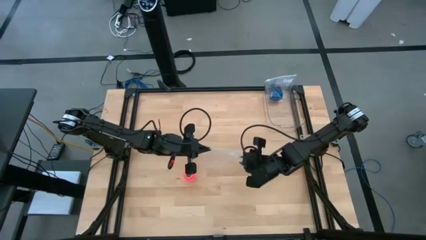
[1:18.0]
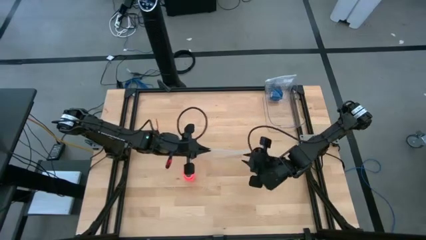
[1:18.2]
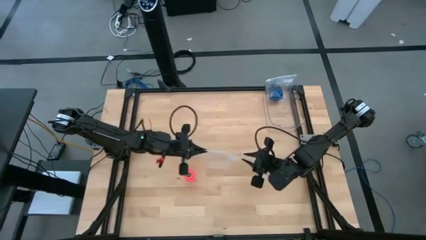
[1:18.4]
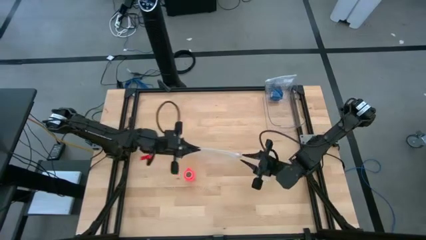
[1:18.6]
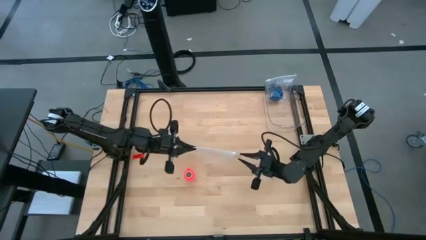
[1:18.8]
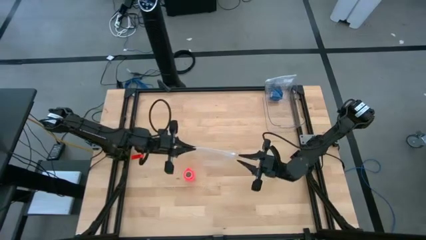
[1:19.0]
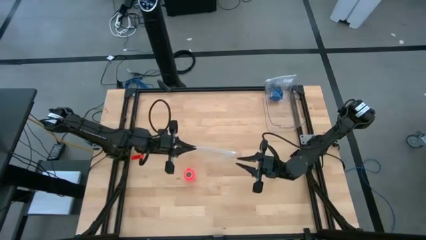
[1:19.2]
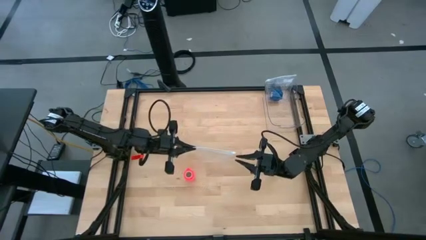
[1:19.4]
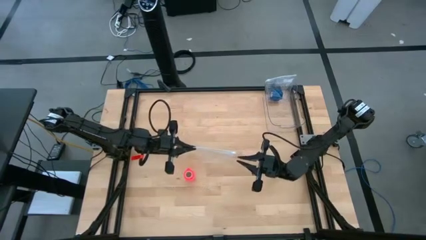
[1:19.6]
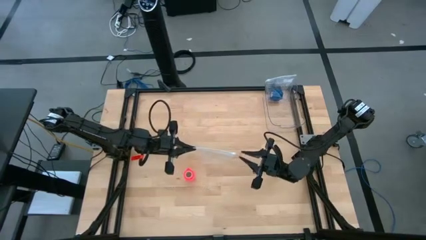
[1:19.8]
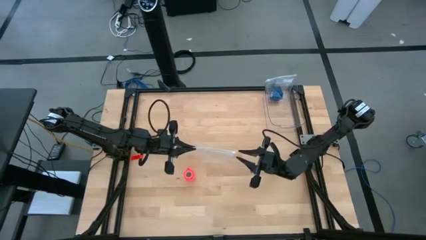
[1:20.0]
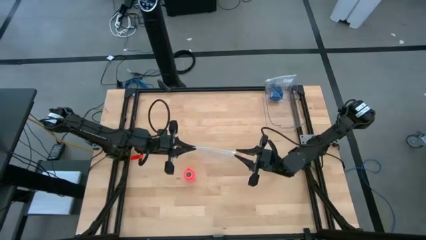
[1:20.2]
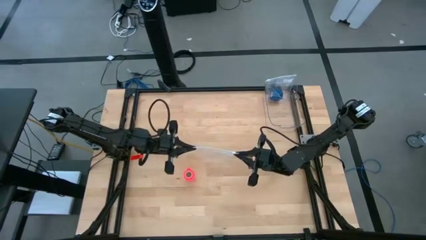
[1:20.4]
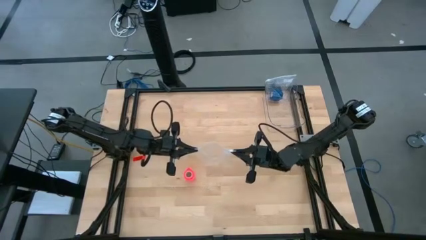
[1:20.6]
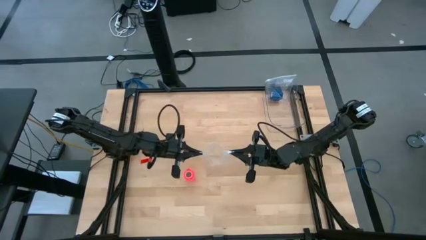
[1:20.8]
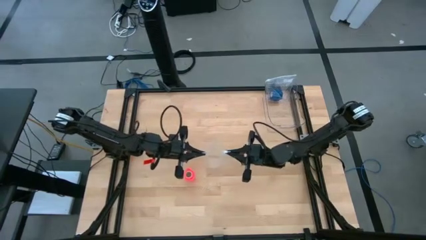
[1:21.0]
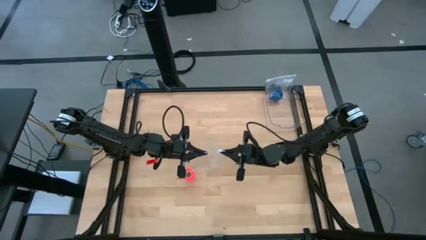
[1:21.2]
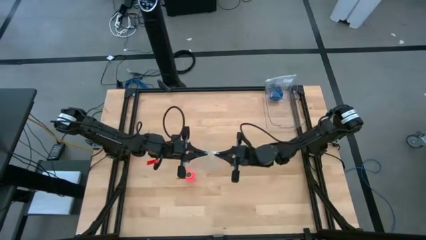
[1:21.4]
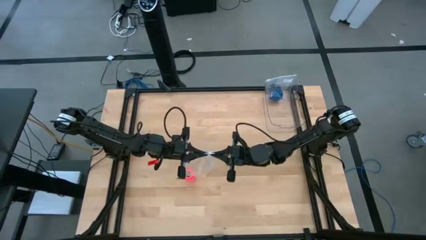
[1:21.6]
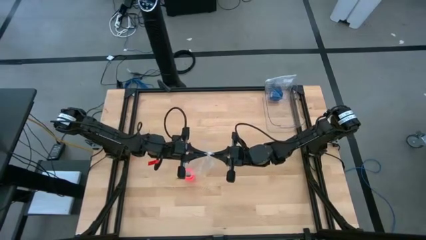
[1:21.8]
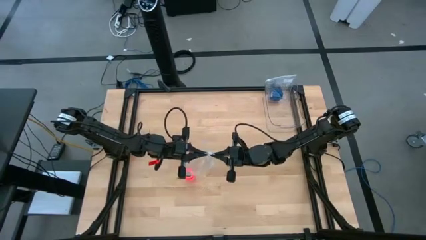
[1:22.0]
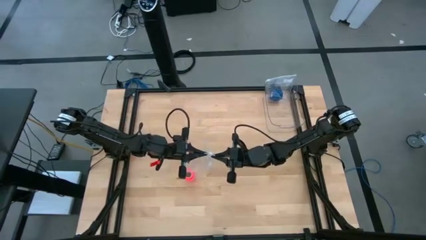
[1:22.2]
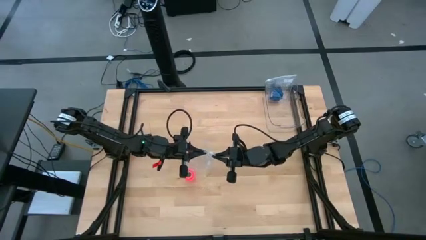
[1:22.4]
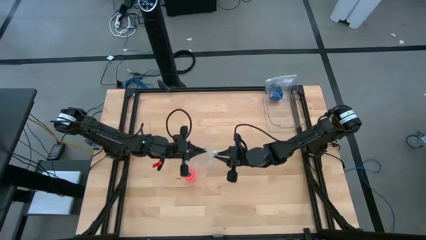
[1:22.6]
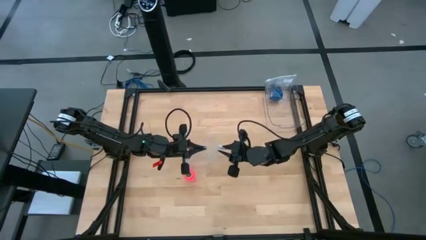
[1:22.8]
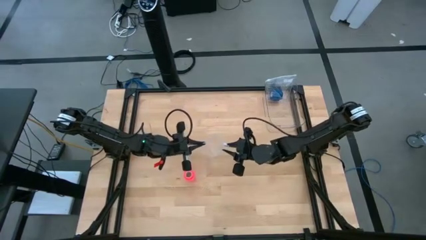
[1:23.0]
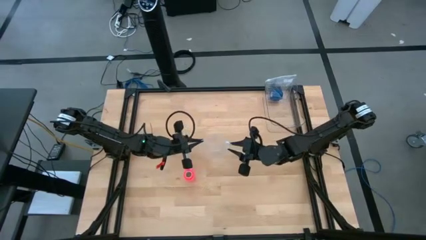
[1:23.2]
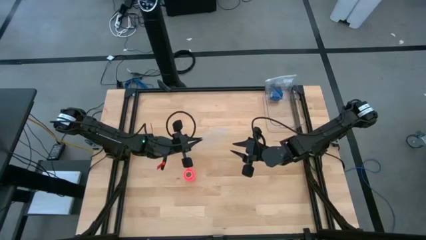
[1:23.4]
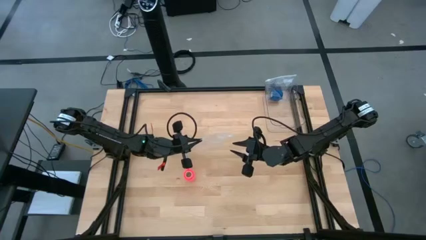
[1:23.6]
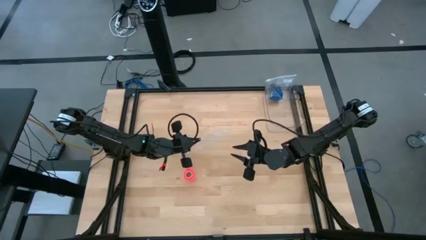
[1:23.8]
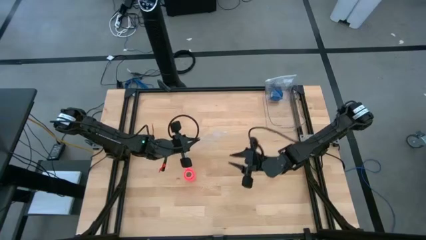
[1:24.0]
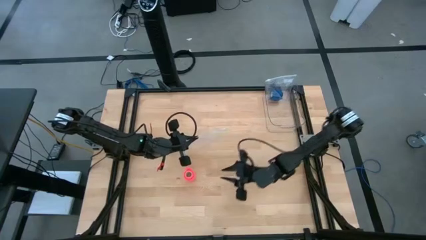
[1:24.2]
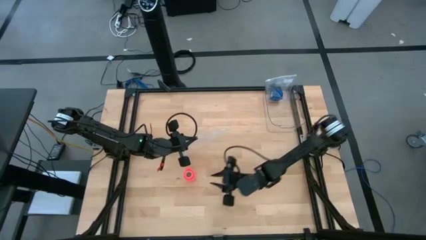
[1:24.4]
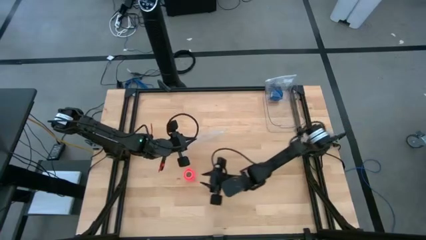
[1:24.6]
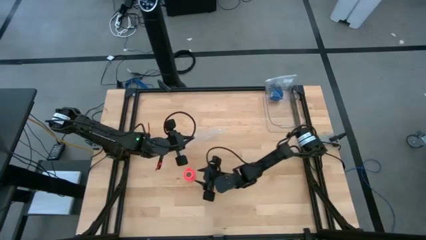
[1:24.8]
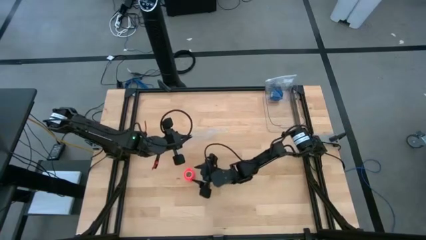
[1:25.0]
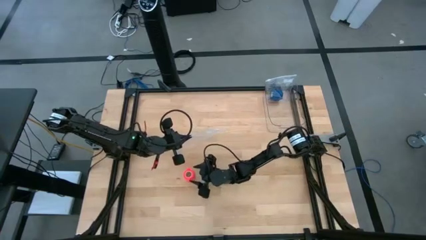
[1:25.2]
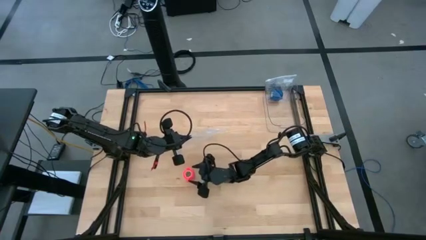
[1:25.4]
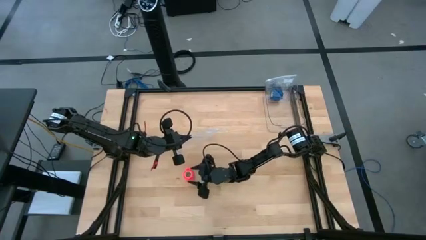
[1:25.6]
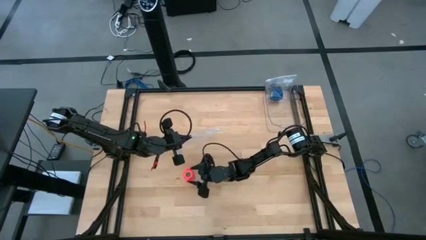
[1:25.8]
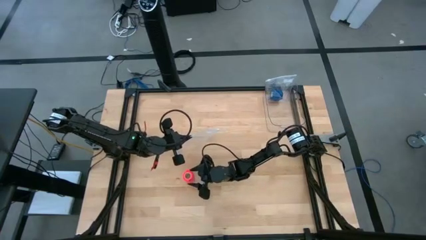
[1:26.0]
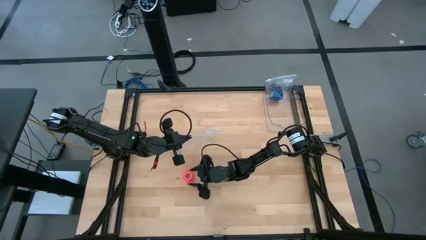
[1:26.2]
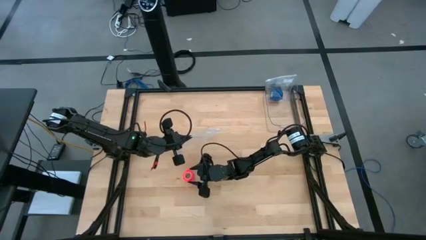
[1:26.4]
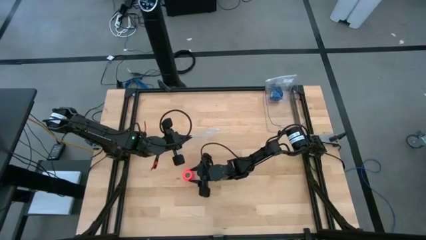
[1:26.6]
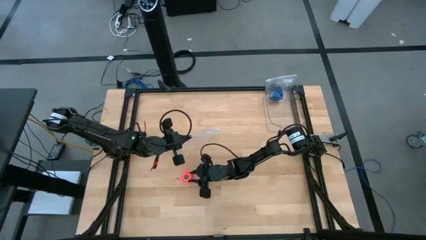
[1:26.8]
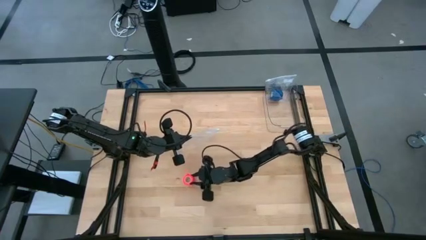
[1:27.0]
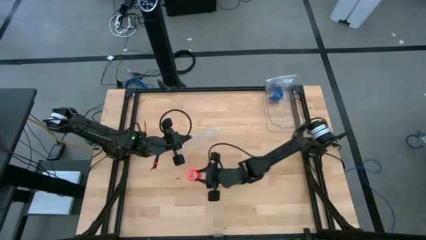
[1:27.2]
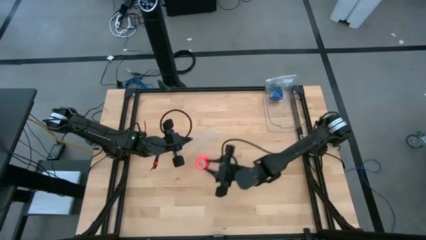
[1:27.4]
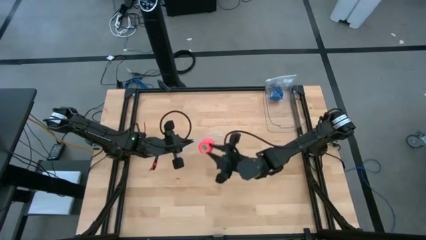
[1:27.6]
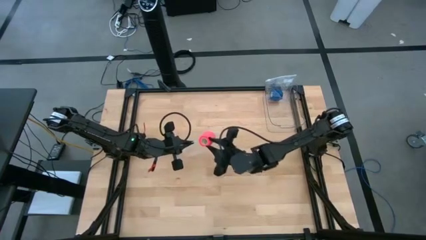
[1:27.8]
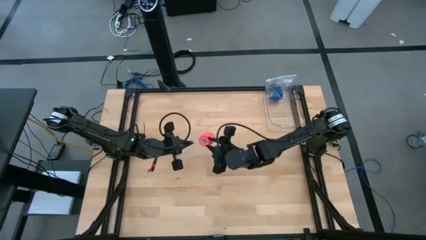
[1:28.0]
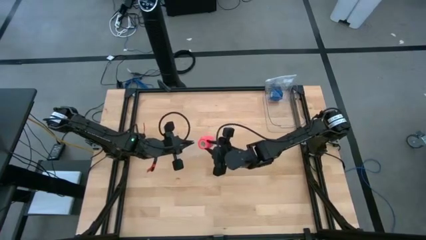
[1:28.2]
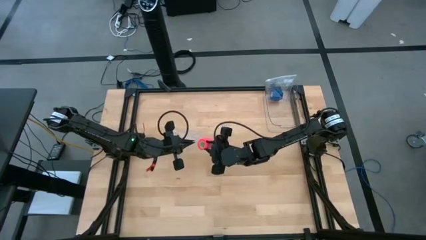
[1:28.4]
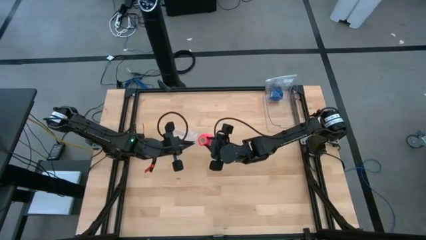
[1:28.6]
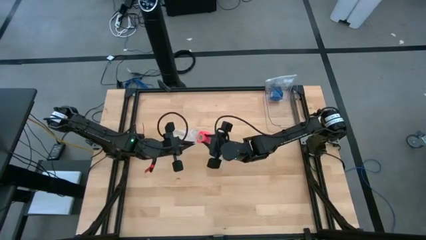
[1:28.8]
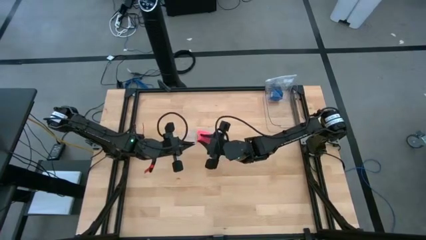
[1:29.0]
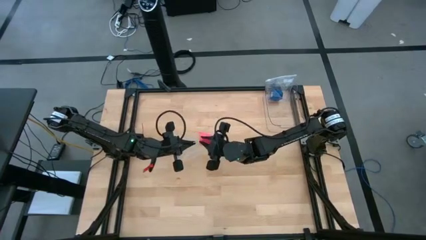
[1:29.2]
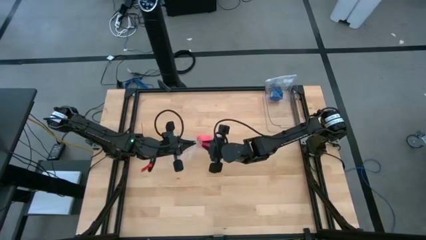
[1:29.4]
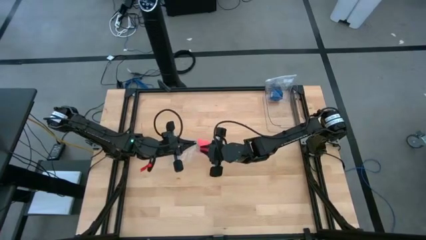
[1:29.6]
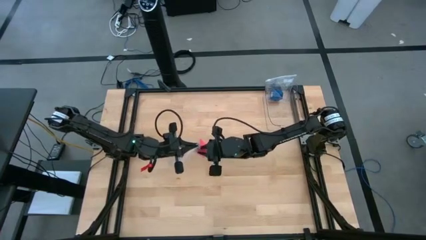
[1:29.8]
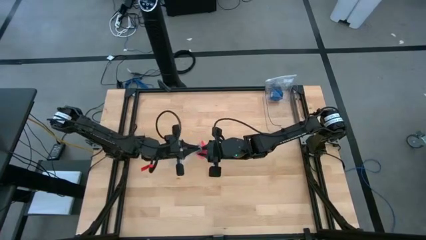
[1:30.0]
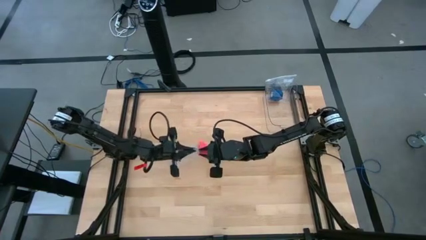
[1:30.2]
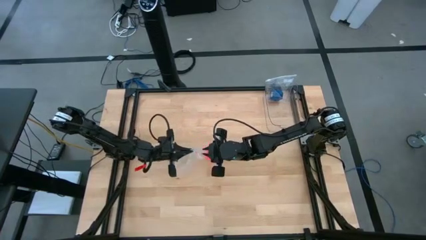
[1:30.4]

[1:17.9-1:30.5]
Task: Roll bandage
Put the rolled pink bandage into the transparent zip bag

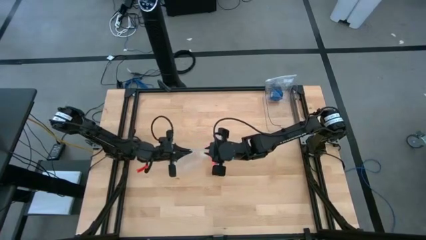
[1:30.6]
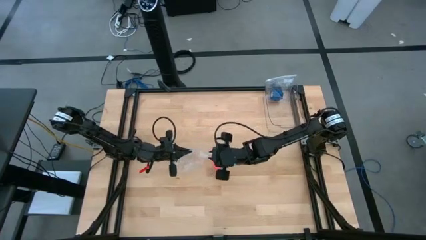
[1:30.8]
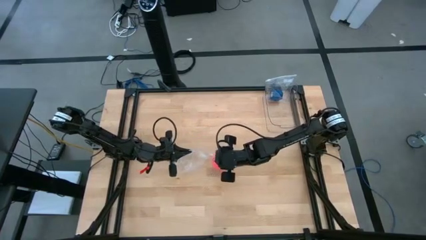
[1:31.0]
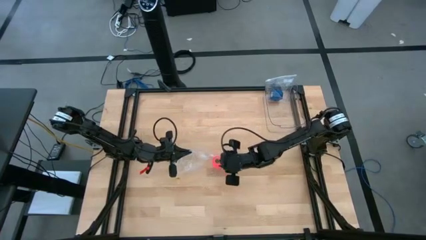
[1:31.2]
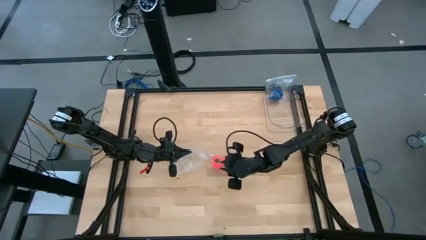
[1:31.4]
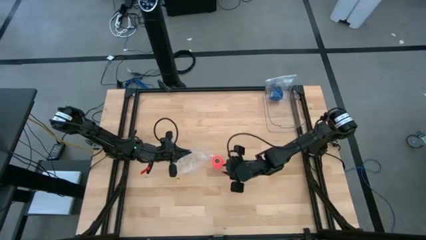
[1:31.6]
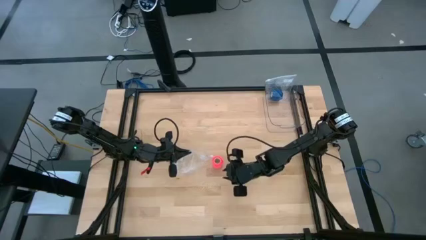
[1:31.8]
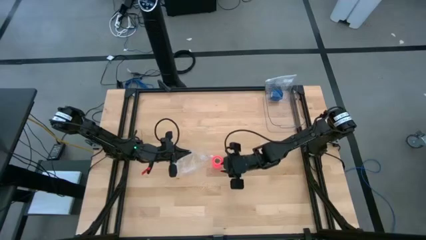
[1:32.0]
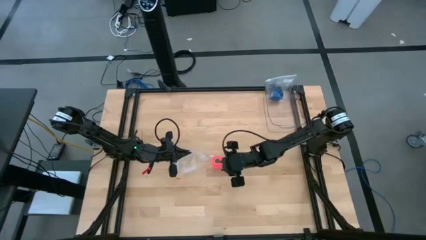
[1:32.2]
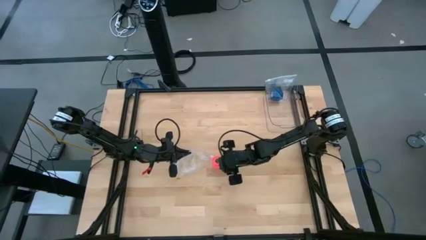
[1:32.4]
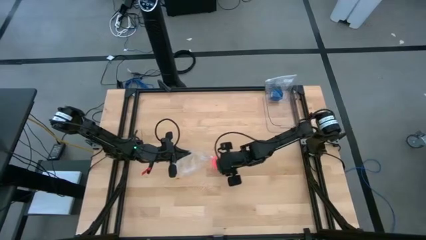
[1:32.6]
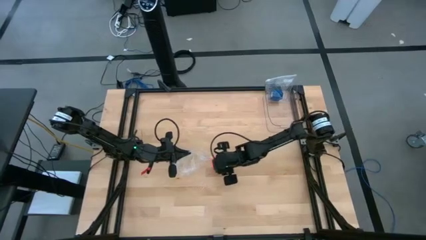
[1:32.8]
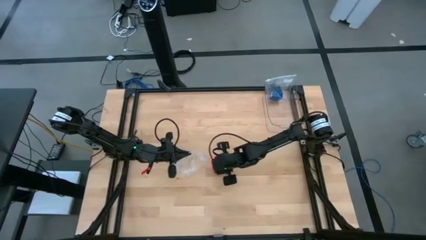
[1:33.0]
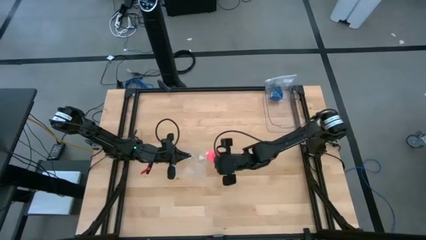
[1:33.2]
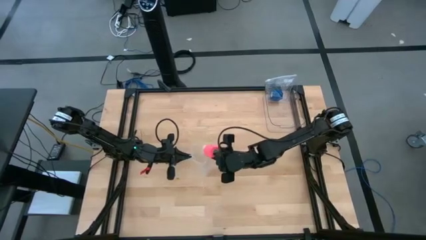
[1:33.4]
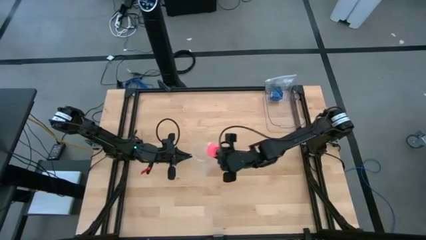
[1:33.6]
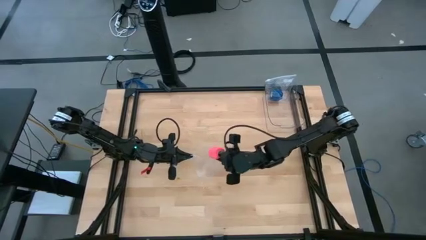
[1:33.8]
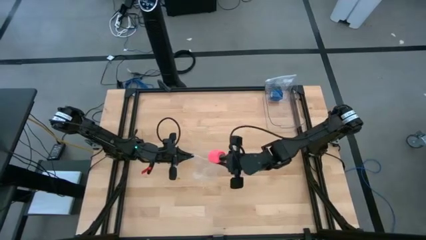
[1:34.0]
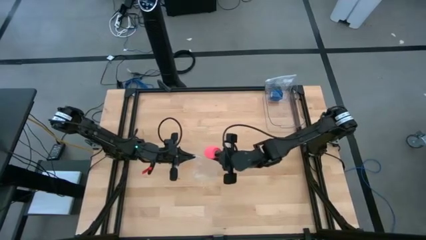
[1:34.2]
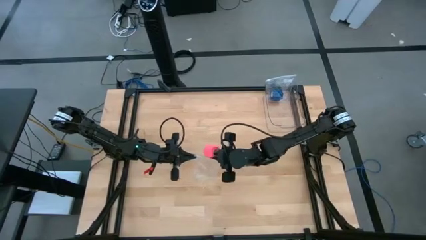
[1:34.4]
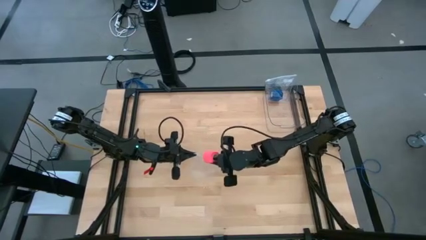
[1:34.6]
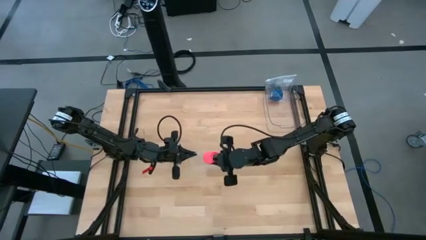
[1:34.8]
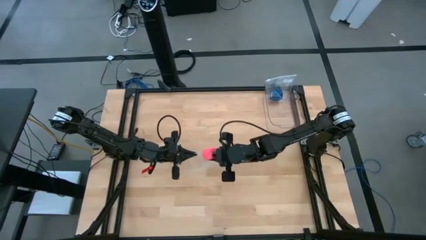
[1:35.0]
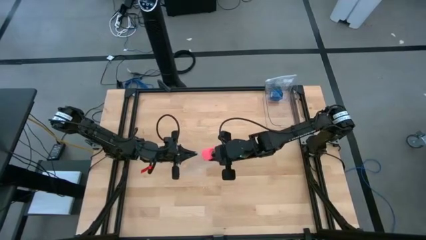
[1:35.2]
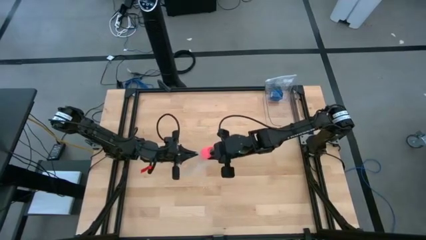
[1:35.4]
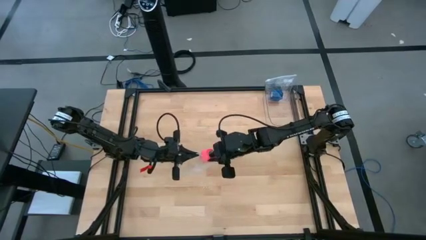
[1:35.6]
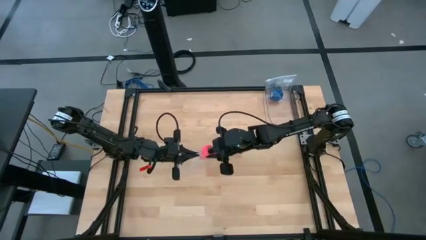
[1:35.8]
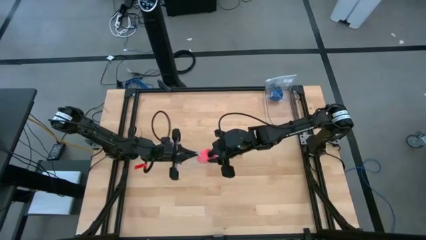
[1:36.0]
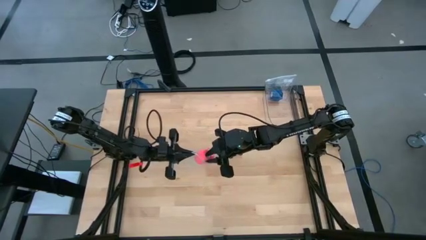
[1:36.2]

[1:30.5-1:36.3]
Put the rolled pink bandage into the transparent zip bag
